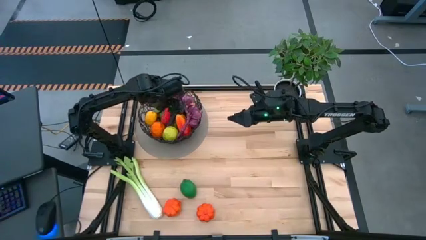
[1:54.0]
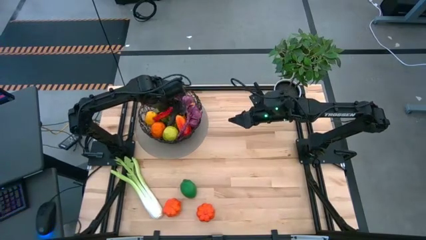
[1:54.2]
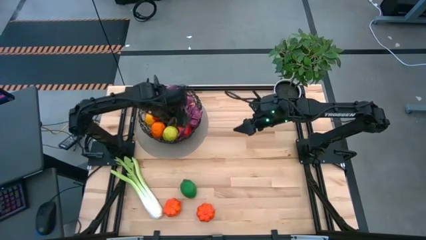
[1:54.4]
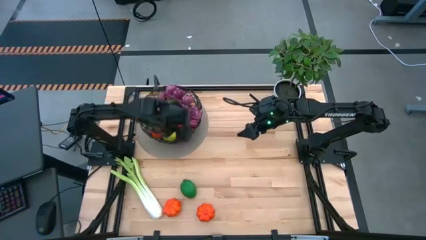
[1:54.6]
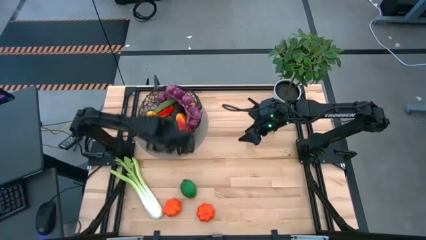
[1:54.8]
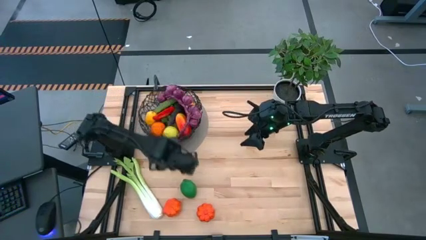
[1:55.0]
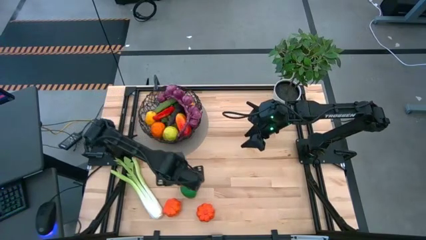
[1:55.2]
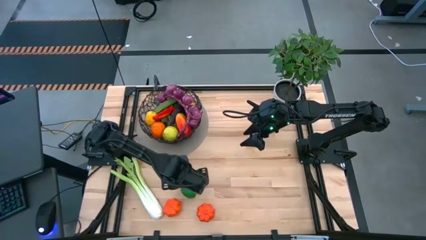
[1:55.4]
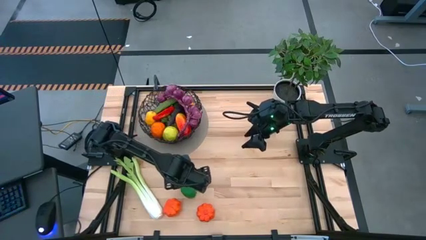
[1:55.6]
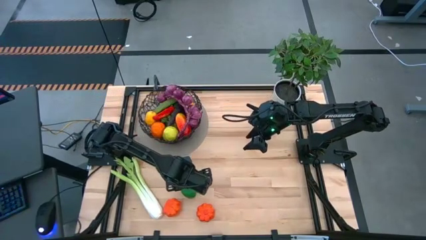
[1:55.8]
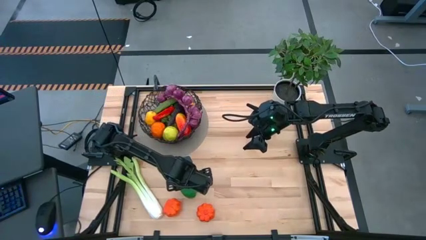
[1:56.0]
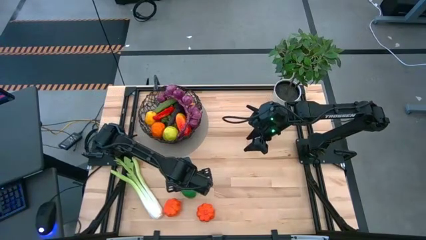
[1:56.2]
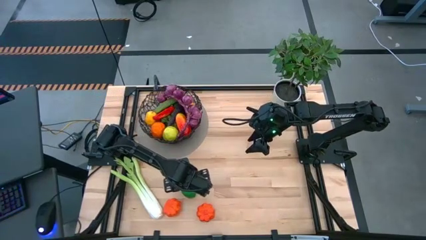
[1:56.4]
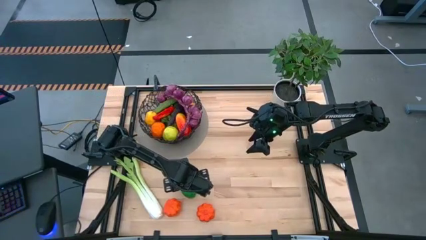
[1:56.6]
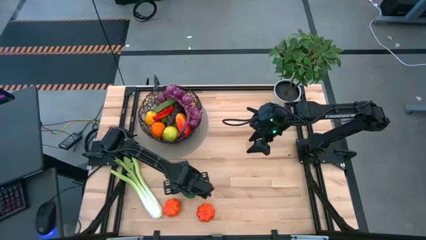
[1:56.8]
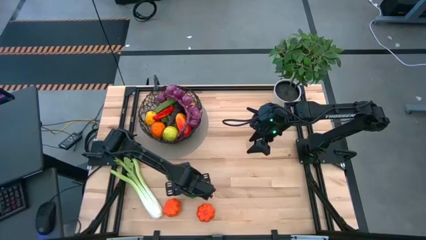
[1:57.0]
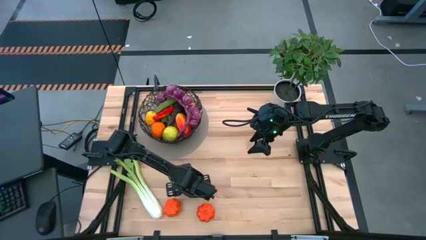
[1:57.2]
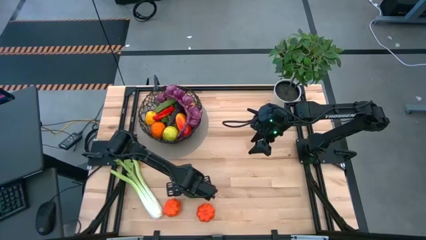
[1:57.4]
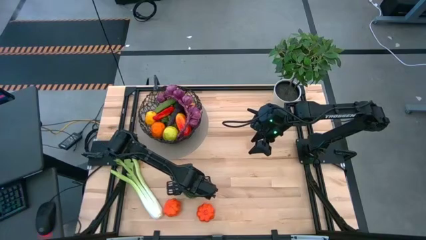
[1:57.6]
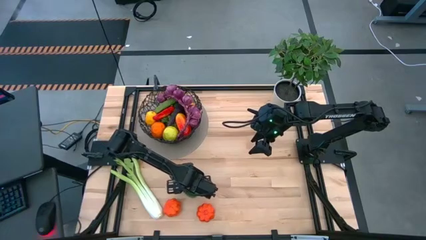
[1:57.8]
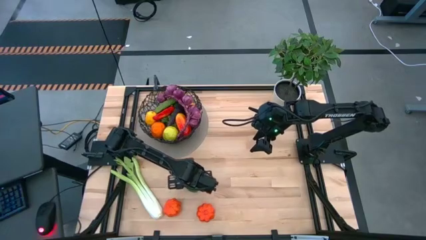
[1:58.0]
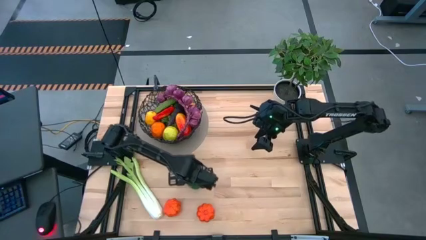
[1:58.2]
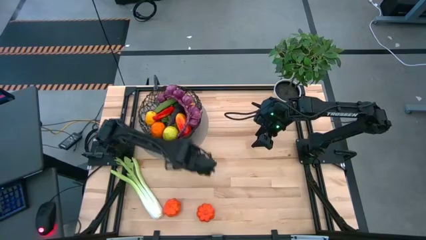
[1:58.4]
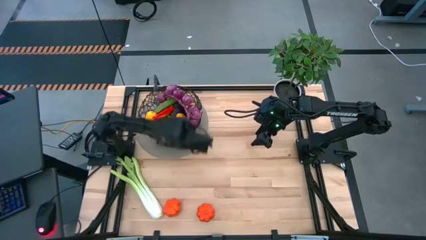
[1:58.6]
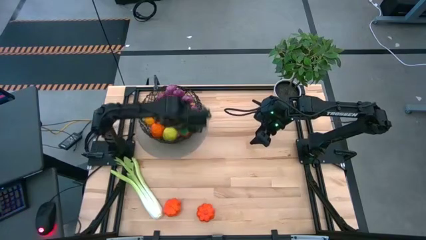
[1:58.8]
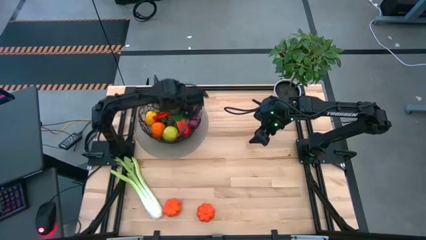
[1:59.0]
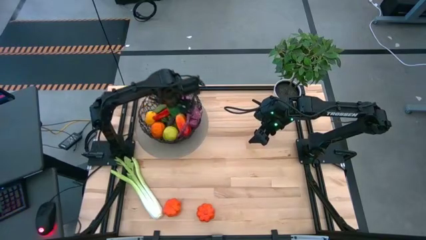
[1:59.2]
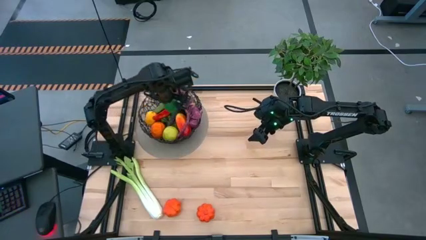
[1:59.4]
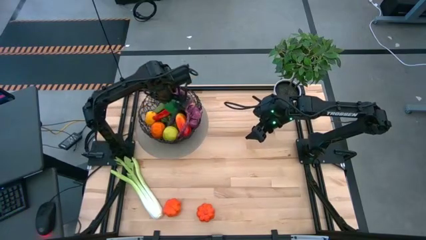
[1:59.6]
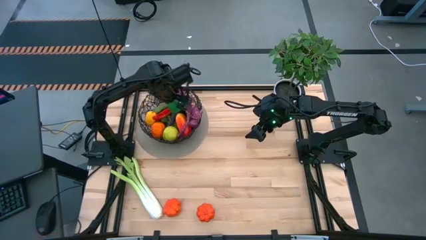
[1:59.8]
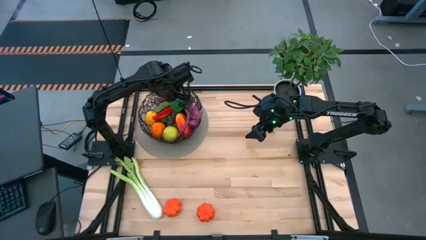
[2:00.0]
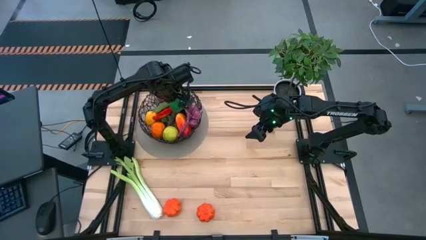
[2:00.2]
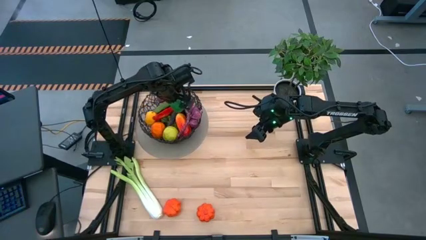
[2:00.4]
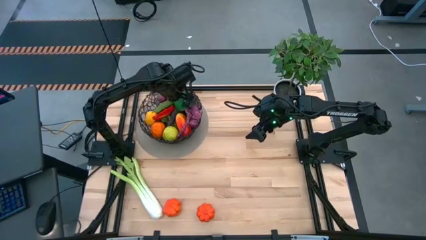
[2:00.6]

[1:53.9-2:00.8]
Task: Build produce basket
Put the green lime into the black wire basket

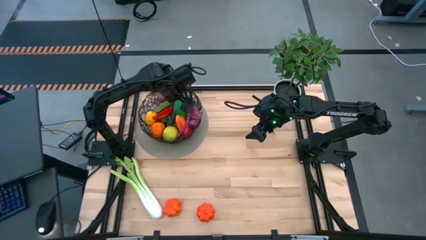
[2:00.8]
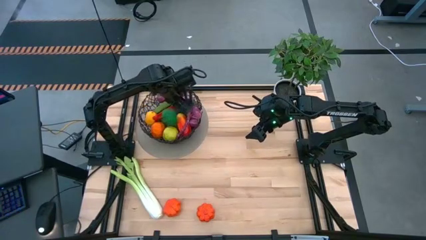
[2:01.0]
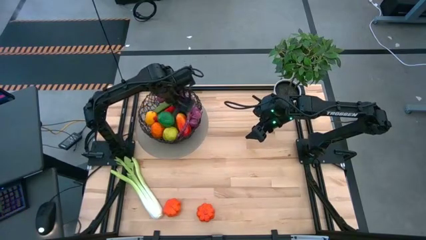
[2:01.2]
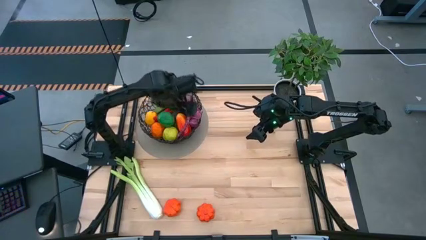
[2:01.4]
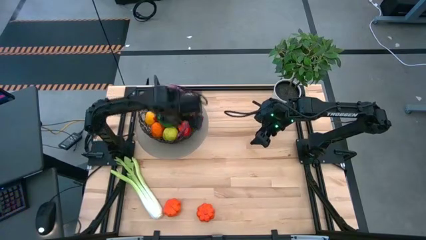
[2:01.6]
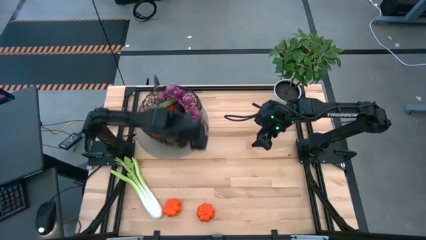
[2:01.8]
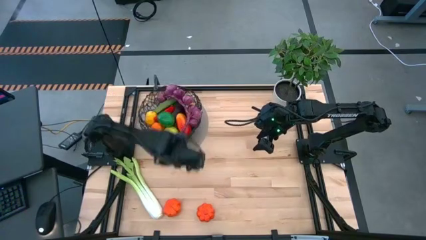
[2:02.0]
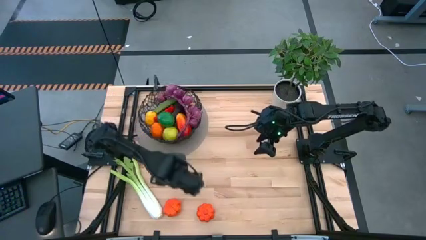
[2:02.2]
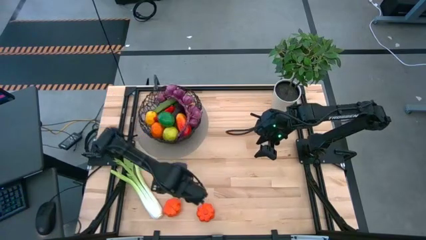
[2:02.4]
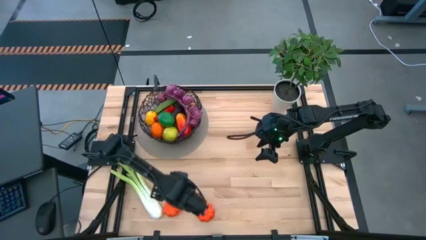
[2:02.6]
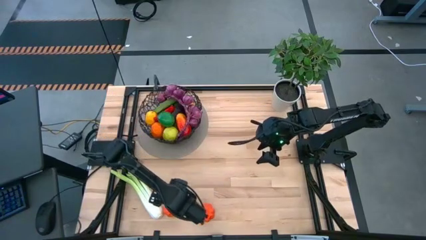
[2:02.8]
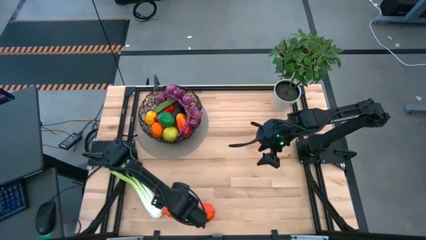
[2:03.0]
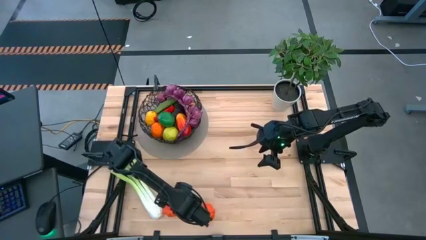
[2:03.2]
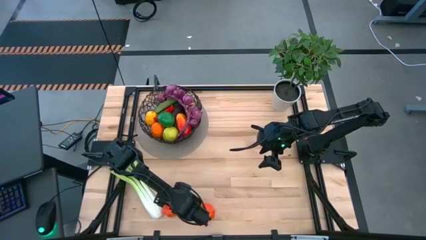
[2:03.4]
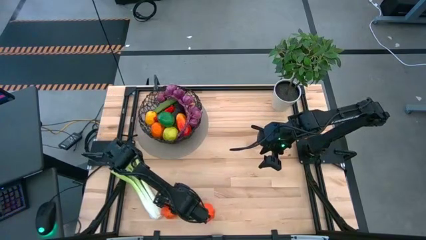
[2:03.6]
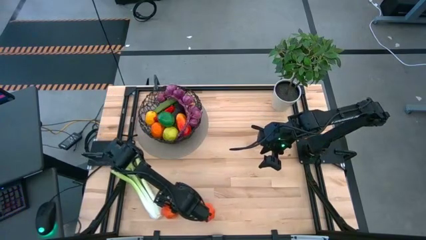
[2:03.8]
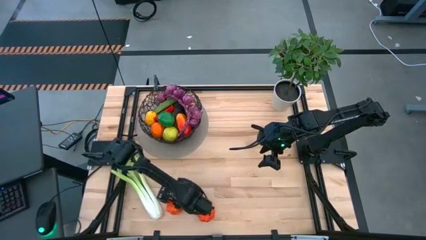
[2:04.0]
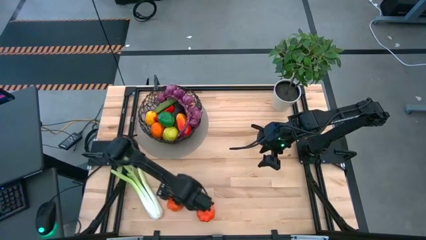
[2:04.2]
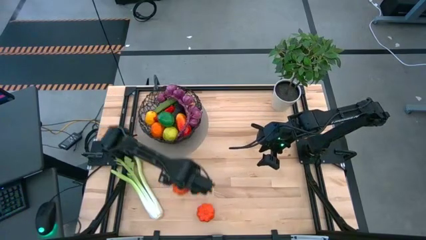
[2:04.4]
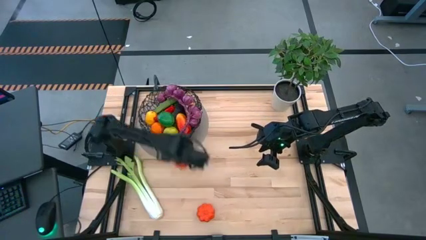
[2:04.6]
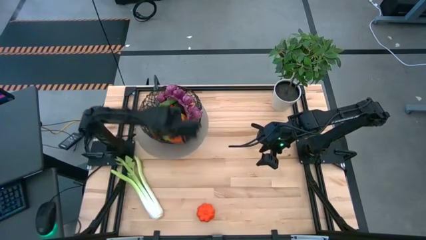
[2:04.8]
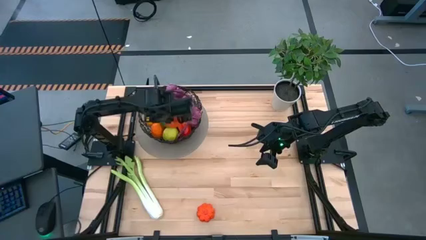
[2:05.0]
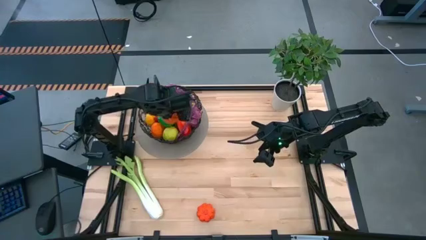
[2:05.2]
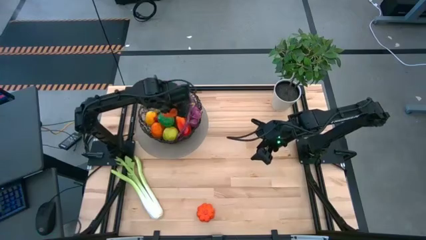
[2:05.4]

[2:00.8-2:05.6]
Put the left orange pumpkin into the black wire basket

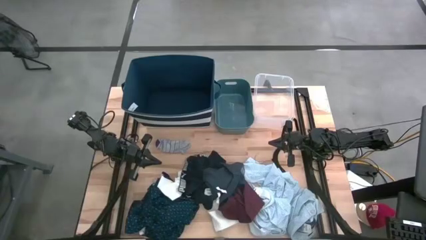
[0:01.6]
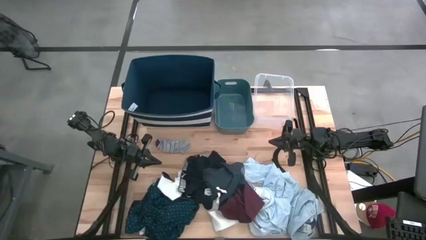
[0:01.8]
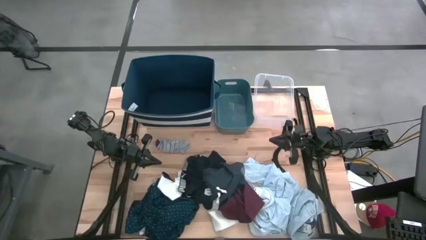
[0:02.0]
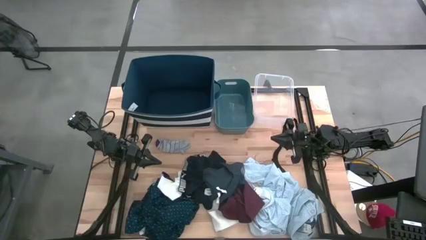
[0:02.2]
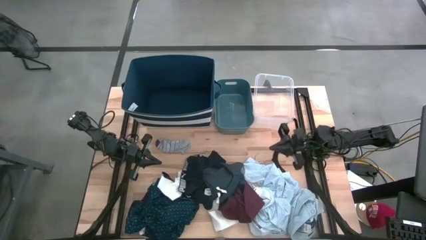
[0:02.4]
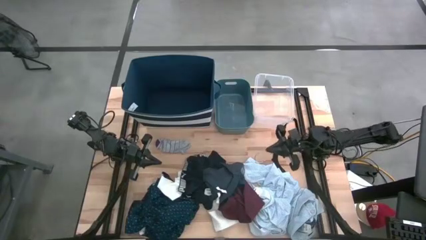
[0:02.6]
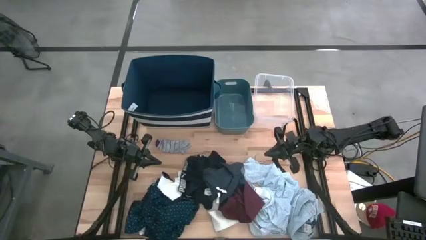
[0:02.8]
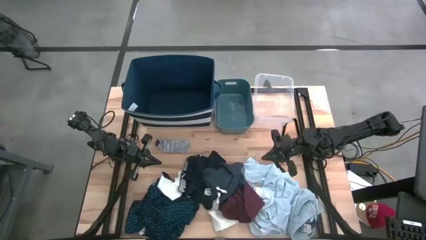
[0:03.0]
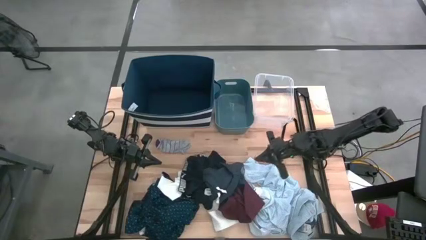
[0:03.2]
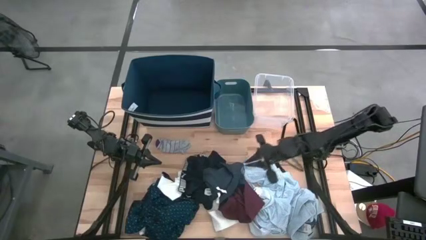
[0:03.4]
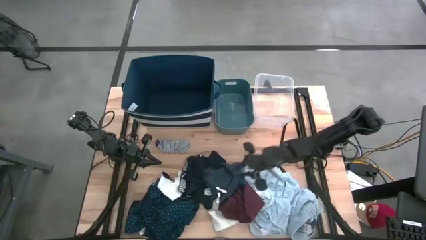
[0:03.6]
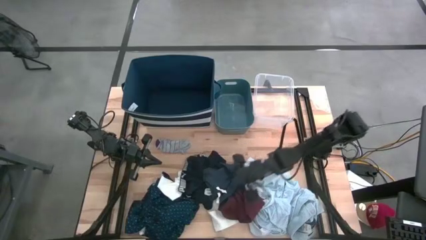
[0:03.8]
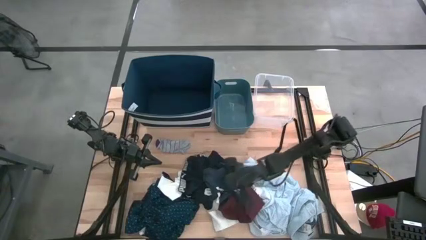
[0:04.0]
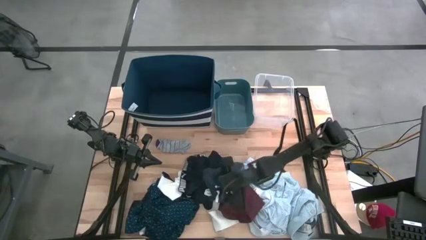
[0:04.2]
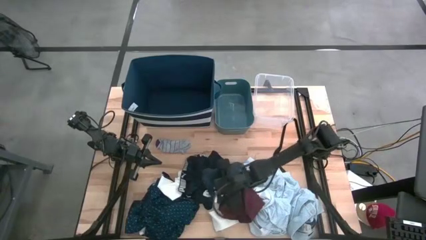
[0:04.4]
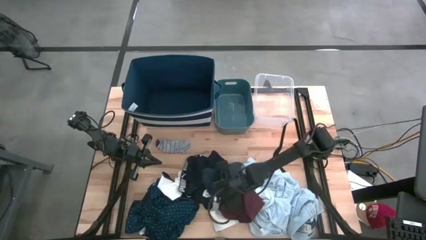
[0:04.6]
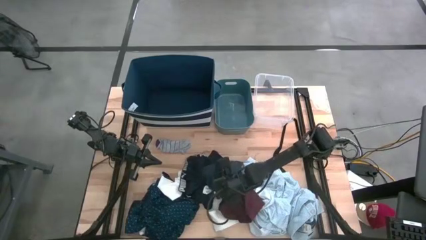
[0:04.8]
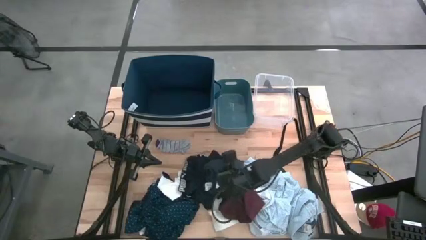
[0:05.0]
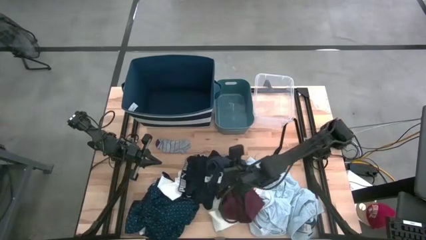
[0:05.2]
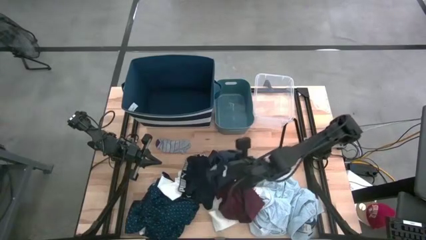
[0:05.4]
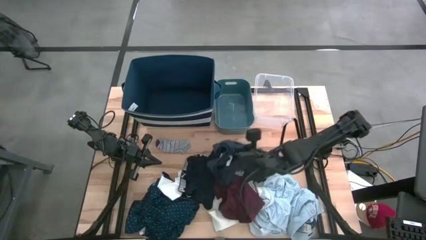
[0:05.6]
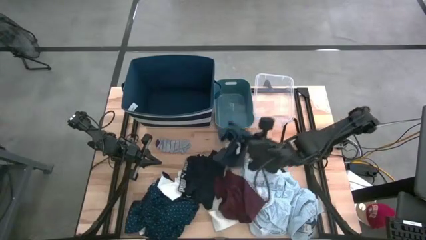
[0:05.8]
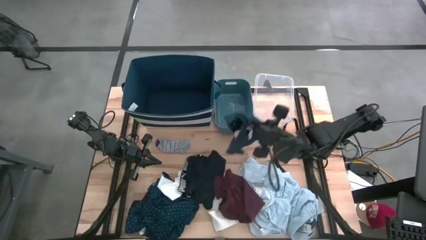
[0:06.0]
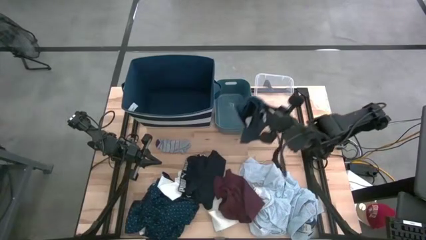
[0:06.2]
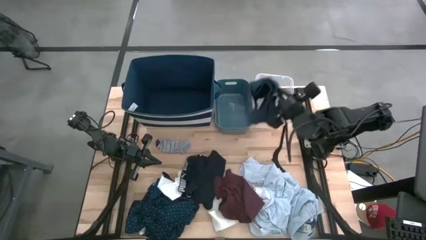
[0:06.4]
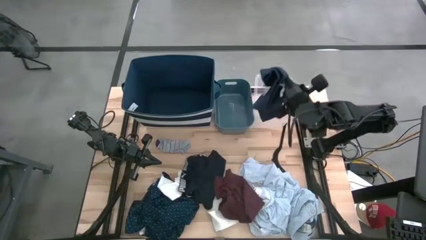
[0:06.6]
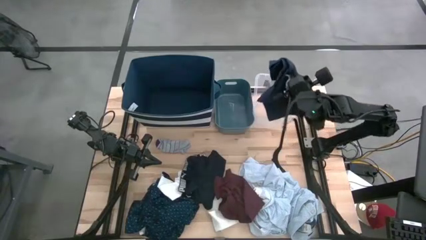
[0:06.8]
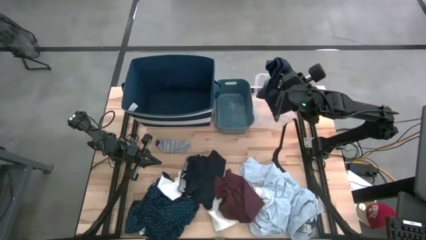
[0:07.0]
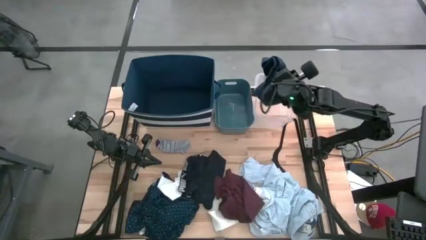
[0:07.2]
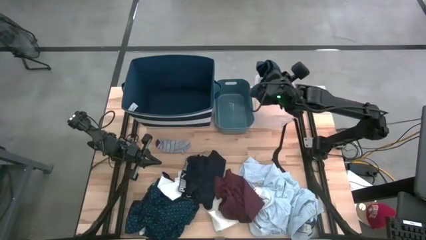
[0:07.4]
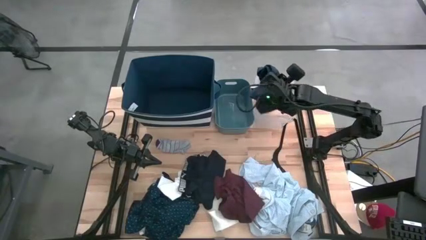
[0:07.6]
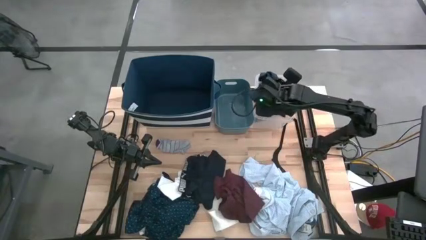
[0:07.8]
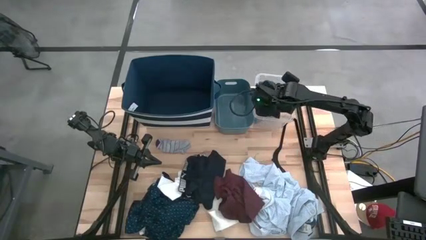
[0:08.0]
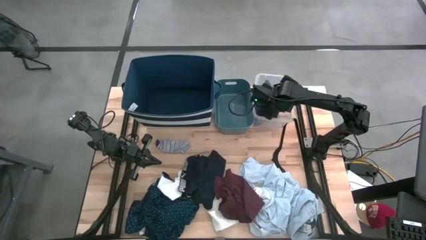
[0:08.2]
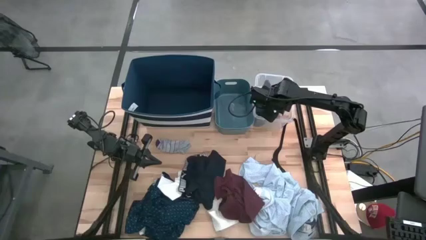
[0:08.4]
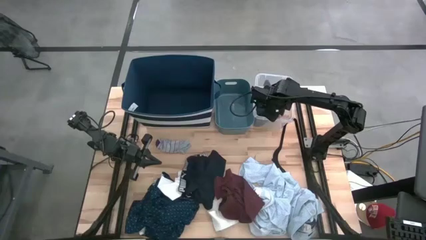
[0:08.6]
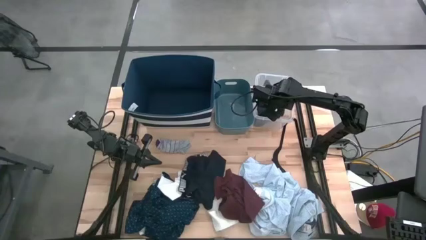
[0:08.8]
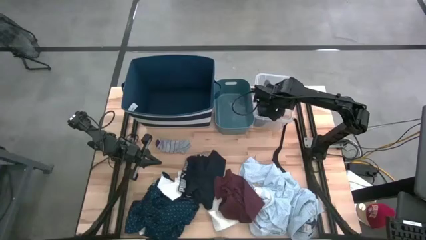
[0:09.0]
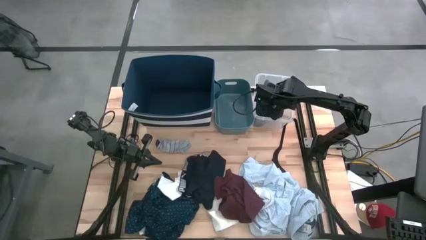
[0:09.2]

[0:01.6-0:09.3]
Task: Pick & Place Cloths
Put the blue boxer into the transparent bin
